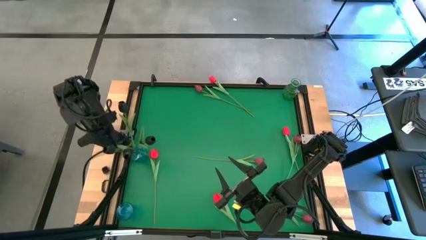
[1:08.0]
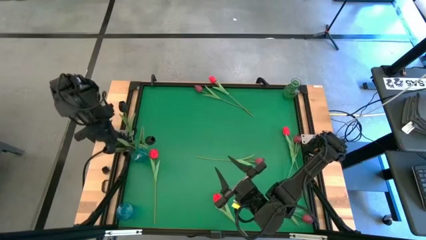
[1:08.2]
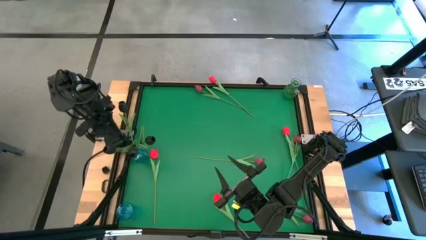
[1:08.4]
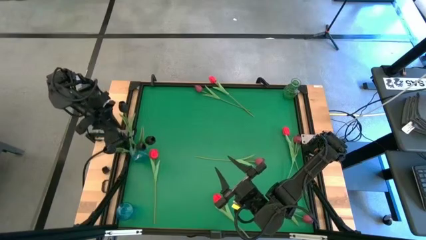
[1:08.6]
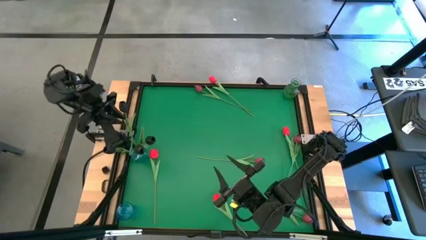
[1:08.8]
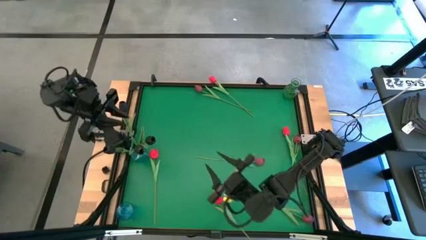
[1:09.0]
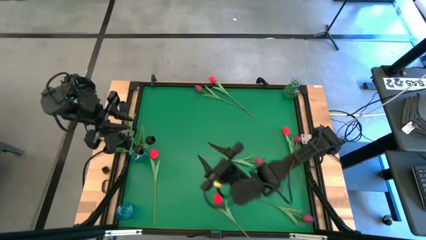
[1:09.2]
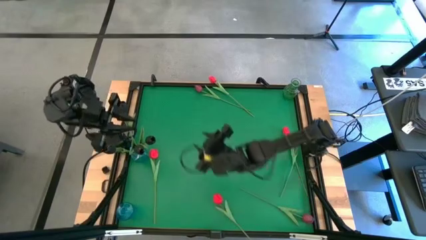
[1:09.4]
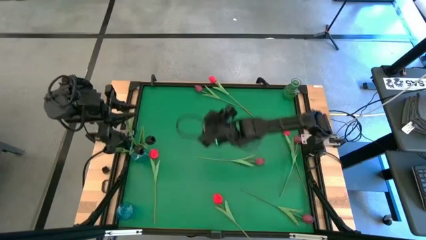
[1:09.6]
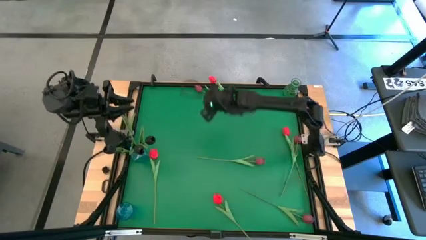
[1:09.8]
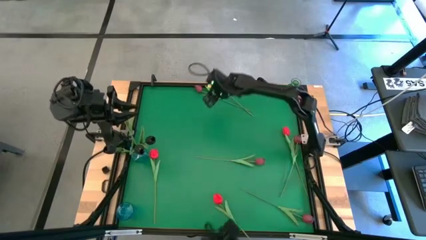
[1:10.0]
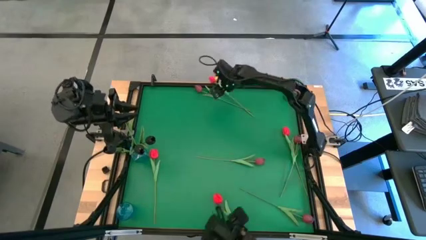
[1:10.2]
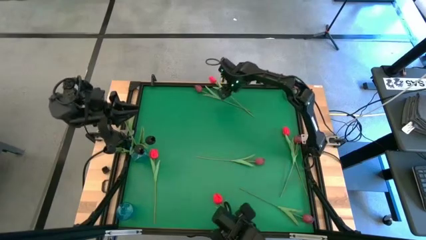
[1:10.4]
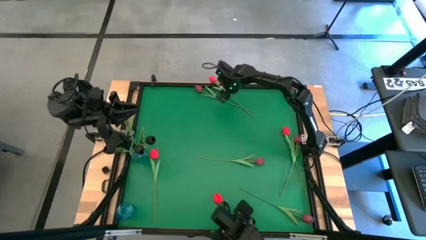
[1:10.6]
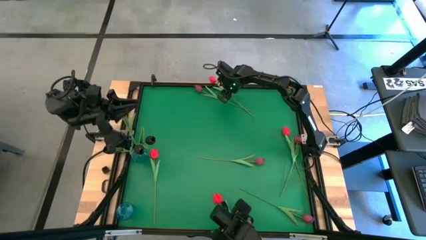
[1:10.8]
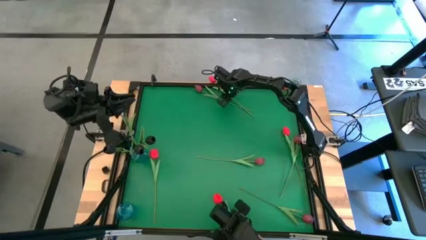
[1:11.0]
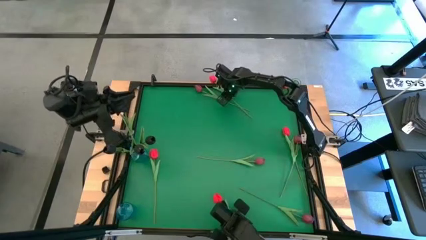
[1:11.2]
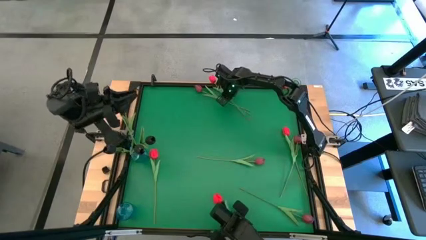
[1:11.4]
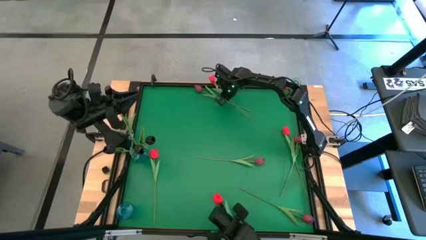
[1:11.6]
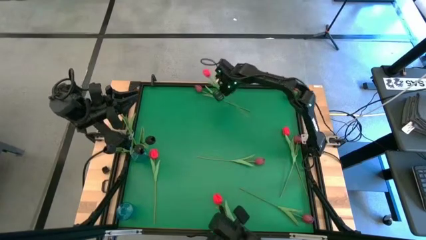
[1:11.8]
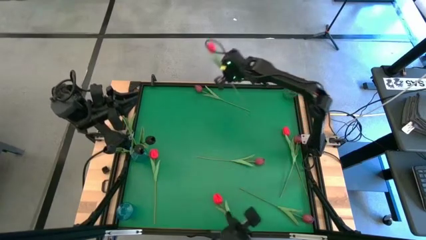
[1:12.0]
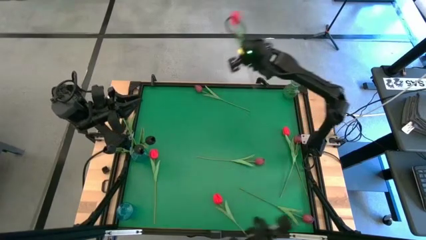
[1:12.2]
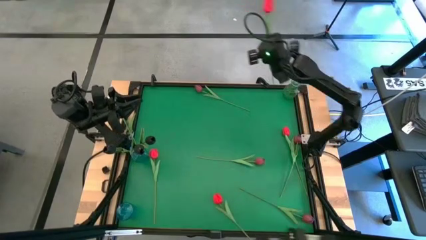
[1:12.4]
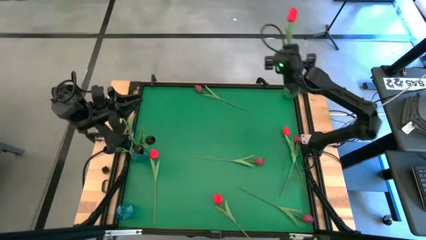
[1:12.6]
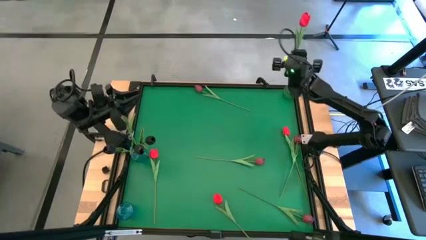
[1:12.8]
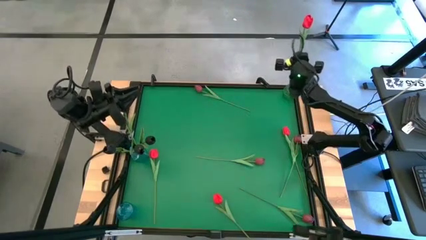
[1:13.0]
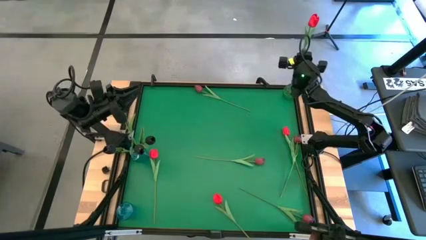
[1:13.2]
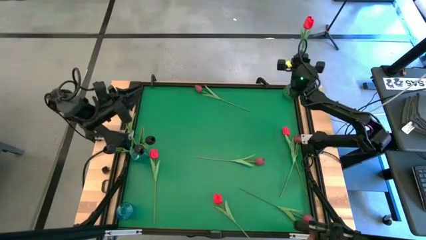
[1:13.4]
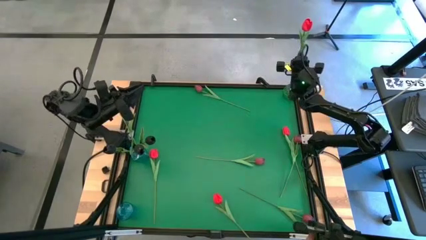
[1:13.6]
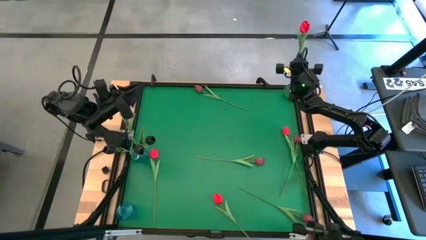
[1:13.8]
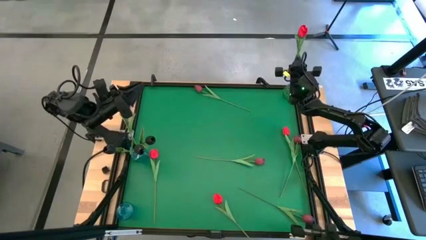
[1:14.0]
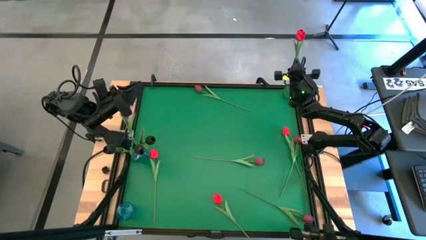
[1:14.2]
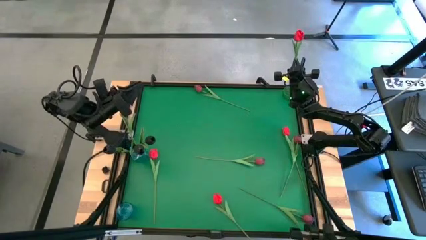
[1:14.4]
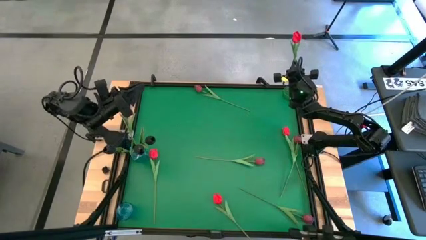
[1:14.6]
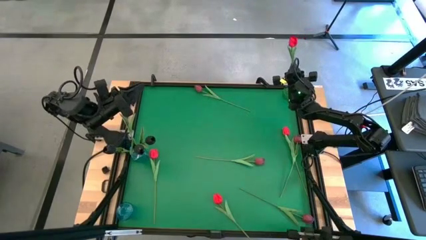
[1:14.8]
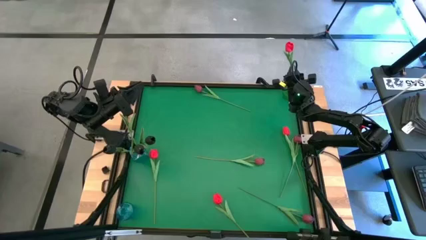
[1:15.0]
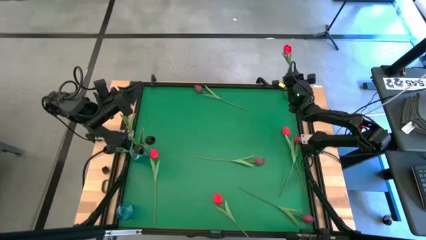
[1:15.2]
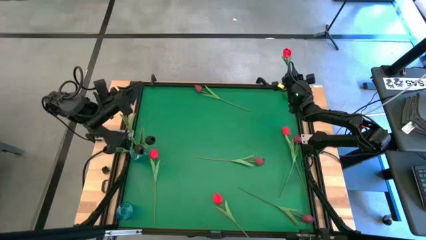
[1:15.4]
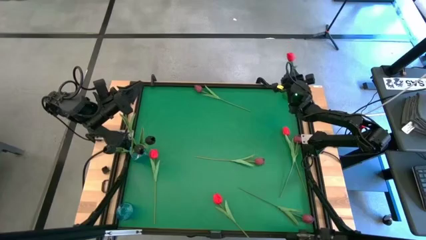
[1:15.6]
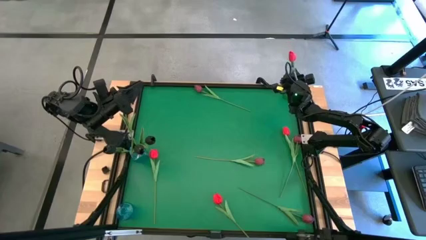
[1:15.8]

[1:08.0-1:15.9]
Task: Sort flowers into vase by color
Put the red tulip into the green vase

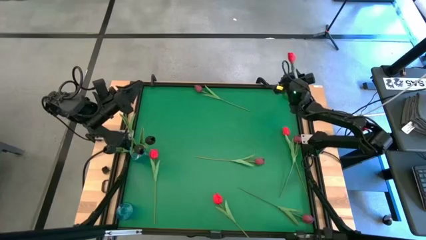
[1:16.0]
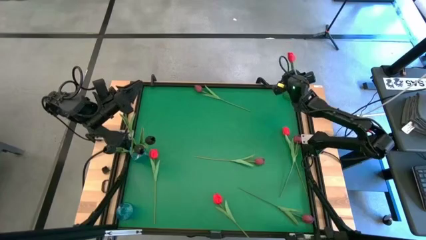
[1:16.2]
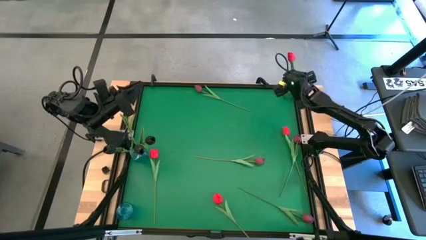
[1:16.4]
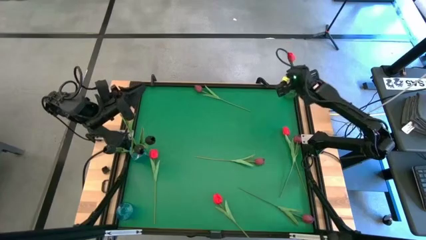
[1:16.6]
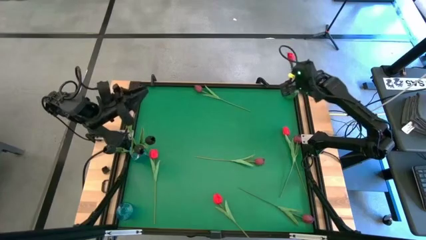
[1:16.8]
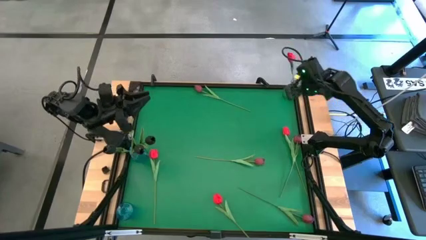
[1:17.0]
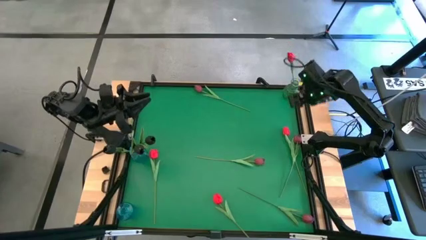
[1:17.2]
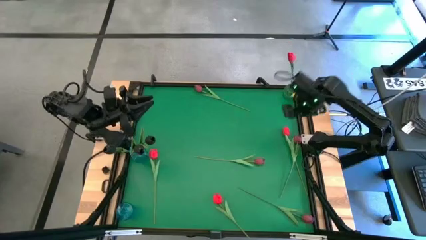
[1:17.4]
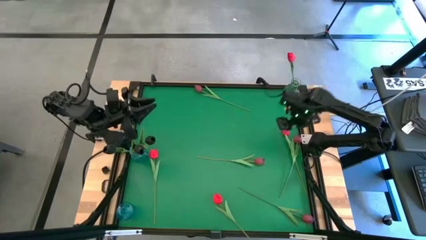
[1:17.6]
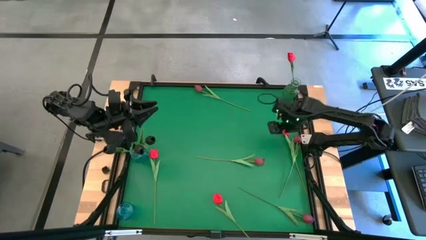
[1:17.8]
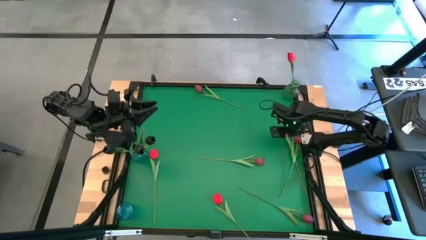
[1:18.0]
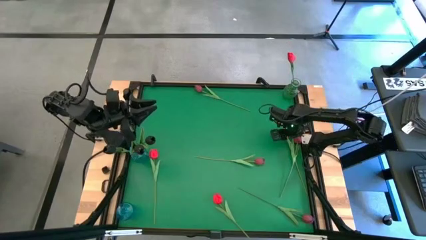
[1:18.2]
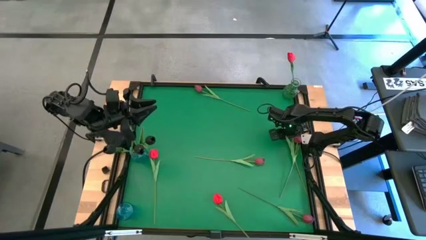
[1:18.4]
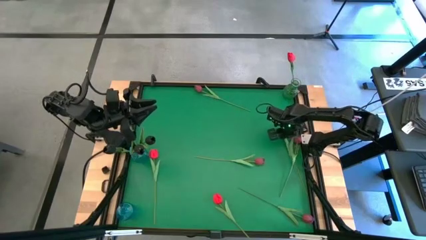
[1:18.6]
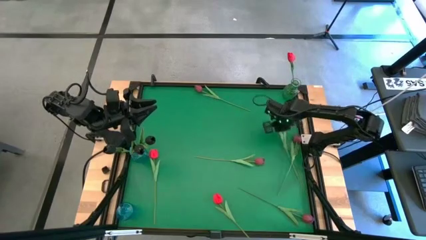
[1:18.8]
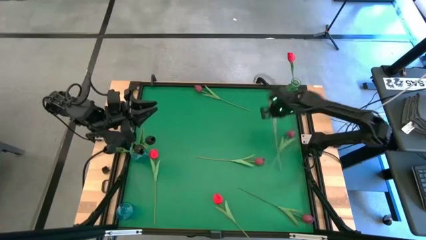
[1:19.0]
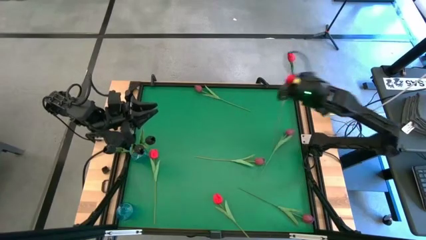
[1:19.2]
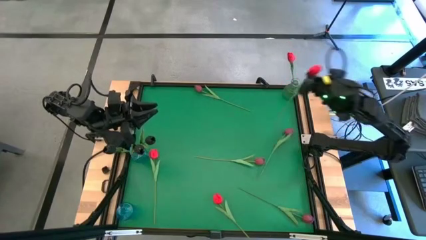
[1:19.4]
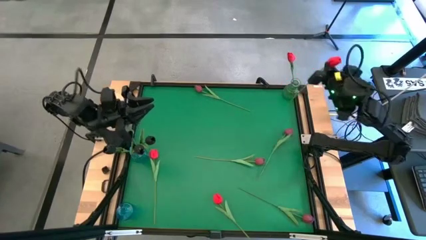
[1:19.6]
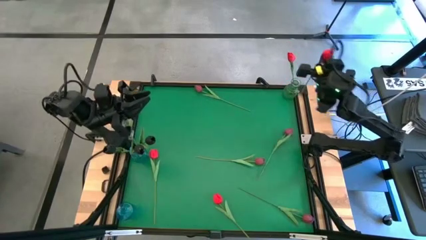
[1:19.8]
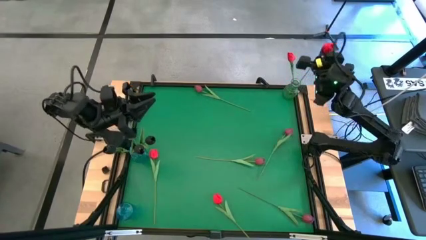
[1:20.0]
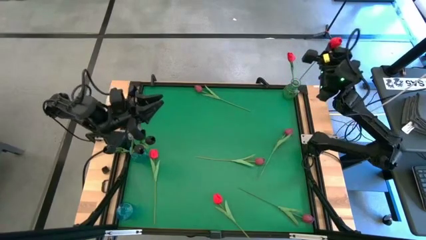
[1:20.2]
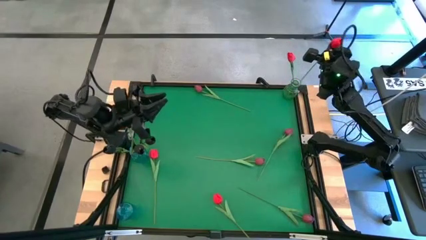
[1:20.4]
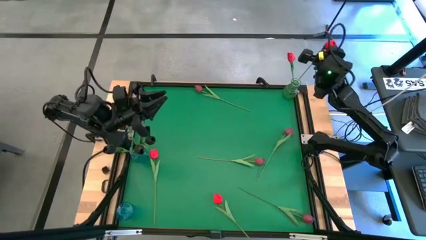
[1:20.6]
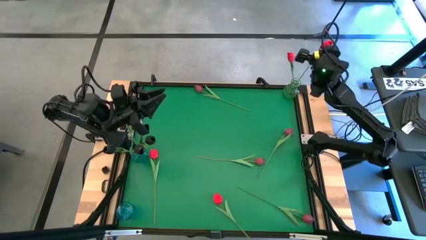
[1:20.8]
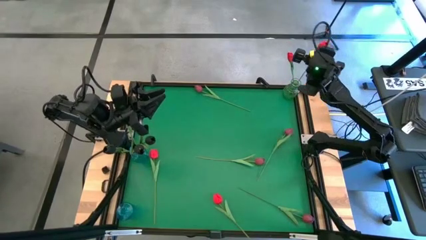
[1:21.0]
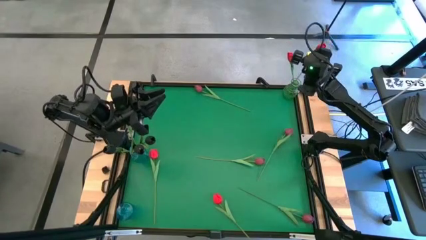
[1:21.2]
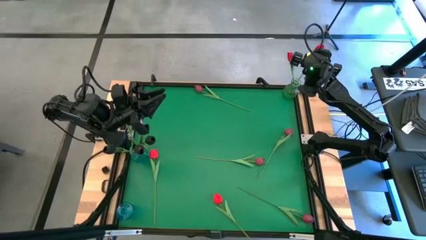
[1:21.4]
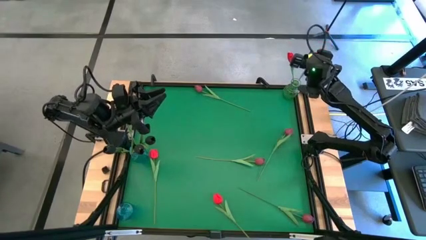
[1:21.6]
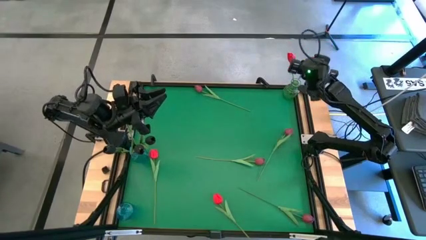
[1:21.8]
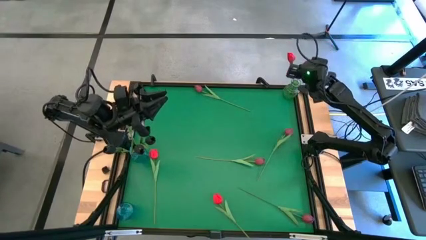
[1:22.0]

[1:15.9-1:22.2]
Put the red tulip into the green vase

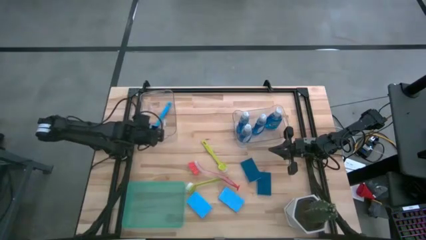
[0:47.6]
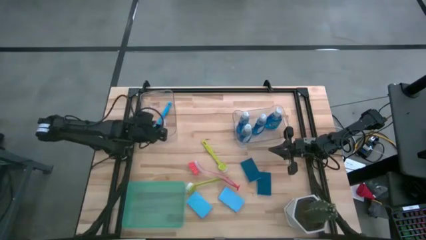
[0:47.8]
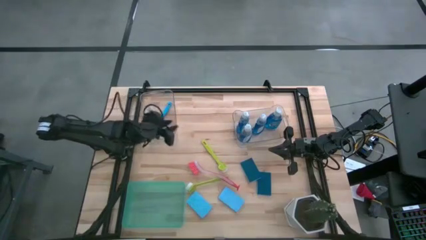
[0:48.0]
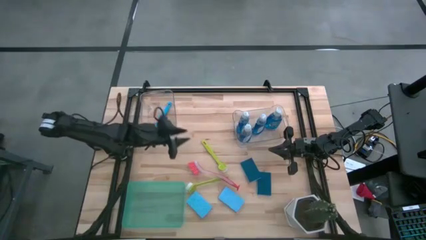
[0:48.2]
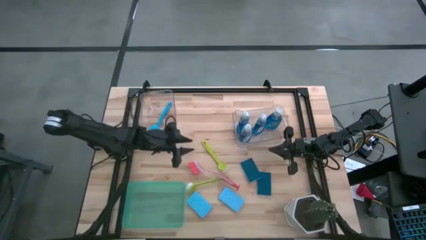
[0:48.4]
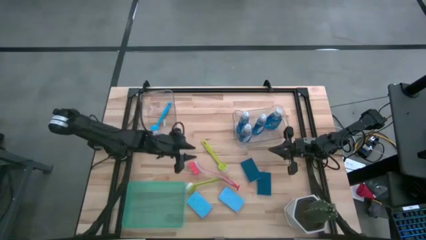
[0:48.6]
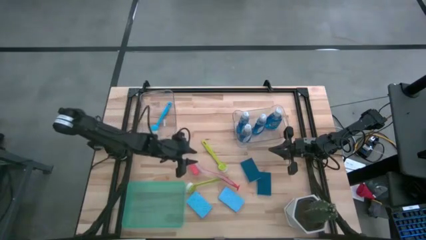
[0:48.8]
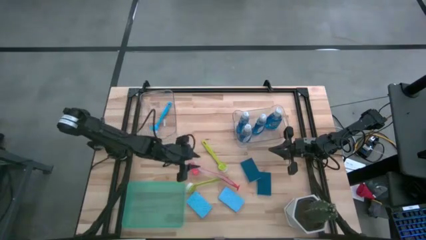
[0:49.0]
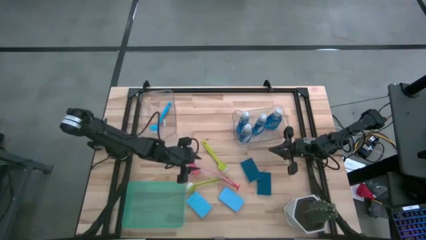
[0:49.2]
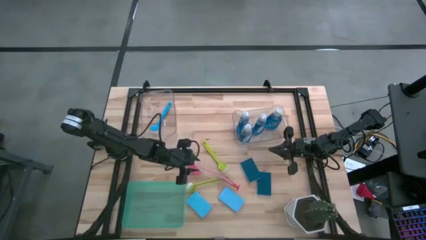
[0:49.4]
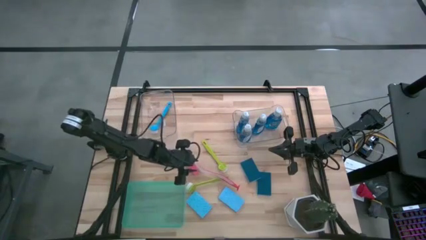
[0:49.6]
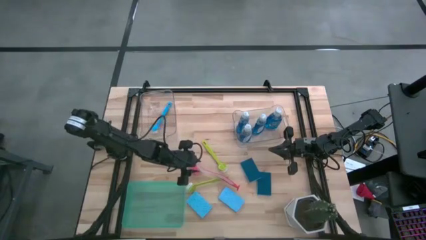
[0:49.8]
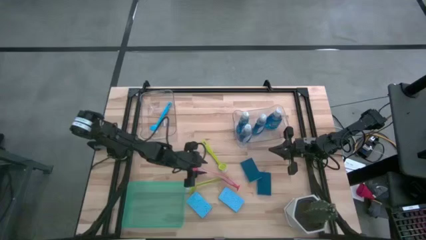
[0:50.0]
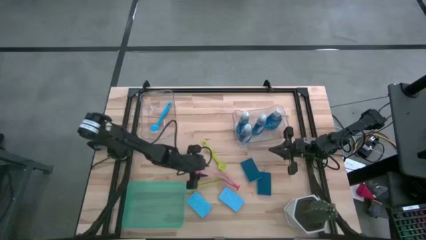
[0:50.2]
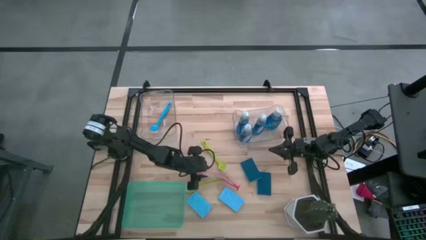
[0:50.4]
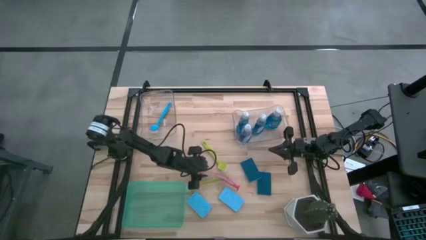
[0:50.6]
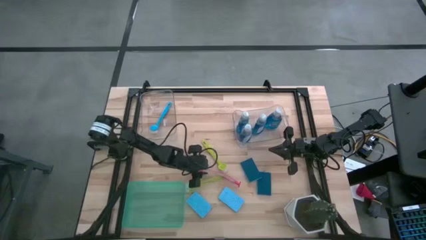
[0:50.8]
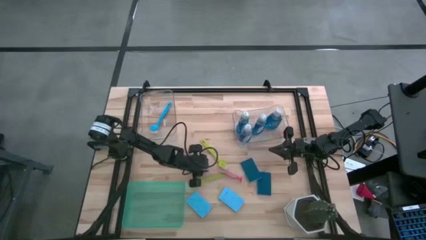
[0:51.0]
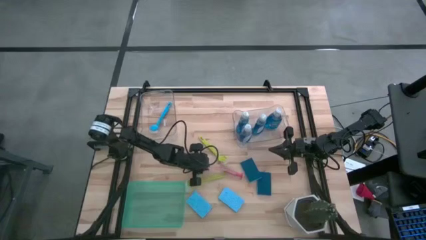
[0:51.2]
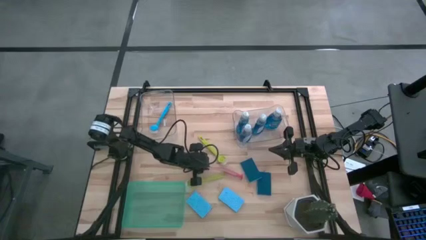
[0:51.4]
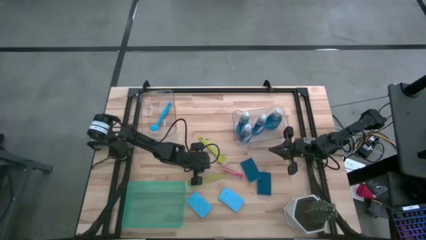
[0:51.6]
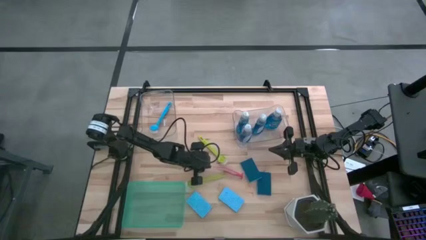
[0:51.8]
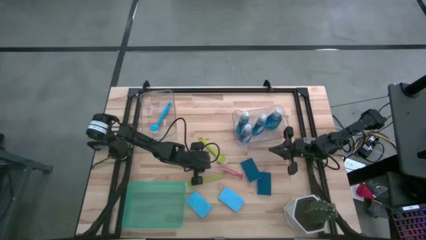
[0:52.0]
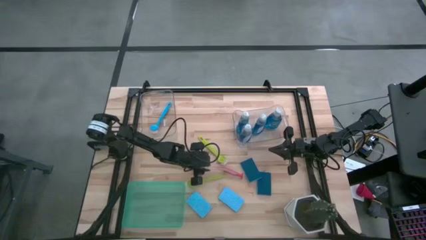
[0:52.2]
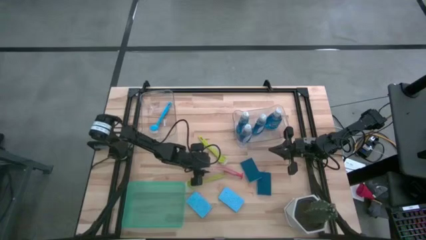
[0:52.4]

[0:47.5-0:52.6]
Task: Pick & Place Kitchen Sink Supplies
Put the orange dish brush into the left transparent bin
